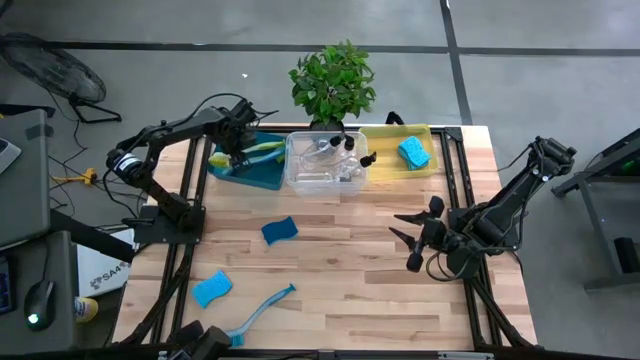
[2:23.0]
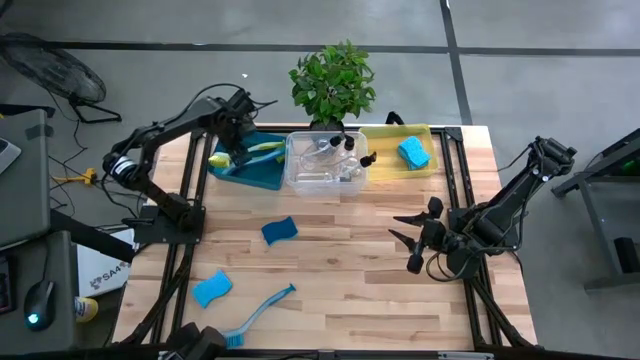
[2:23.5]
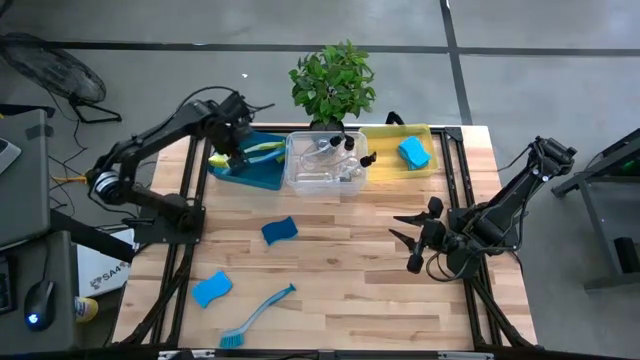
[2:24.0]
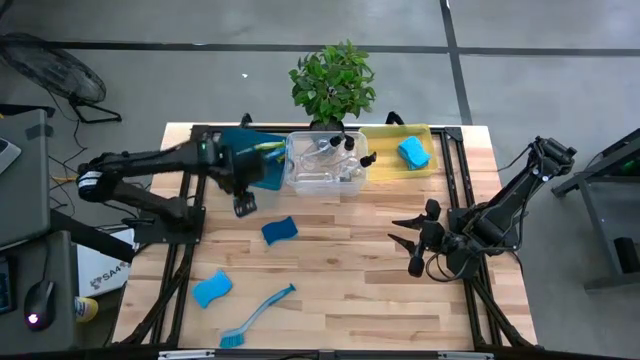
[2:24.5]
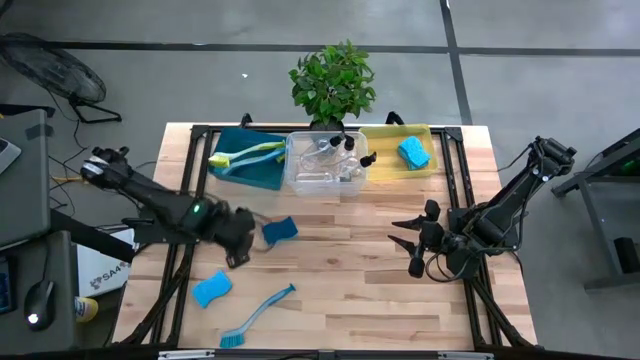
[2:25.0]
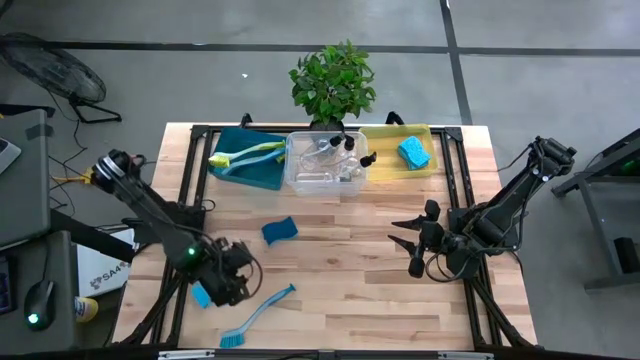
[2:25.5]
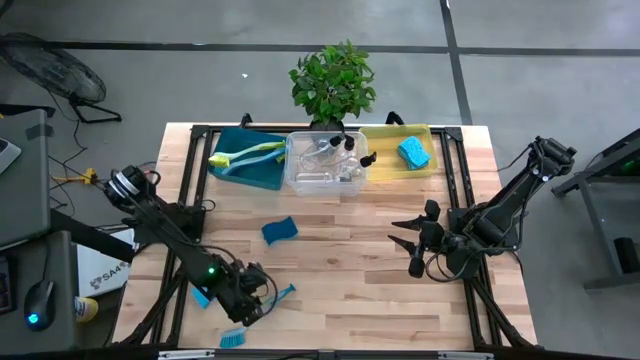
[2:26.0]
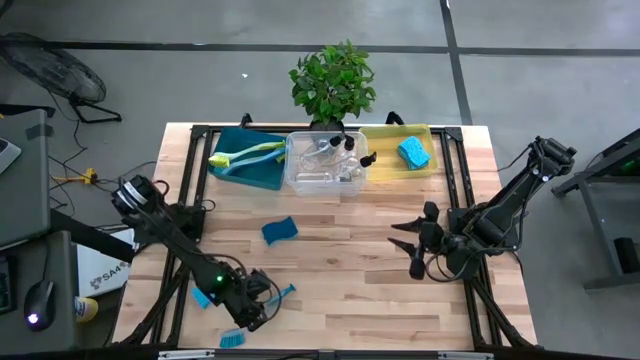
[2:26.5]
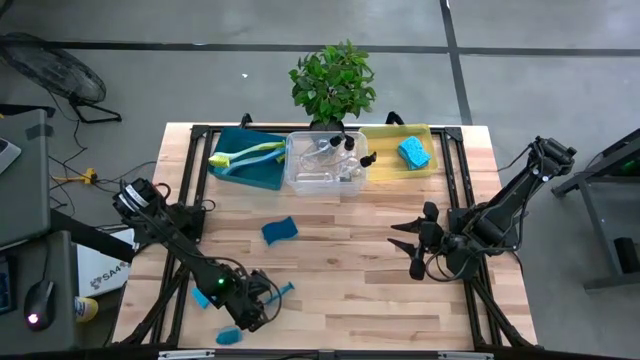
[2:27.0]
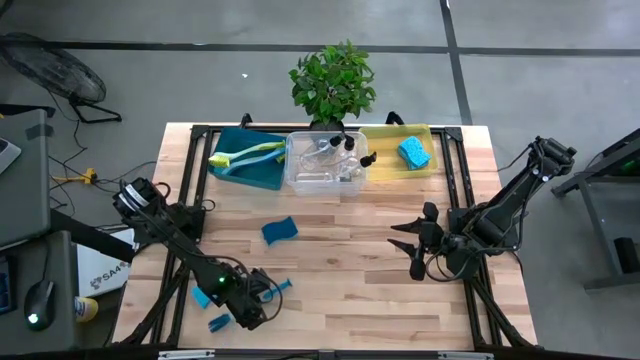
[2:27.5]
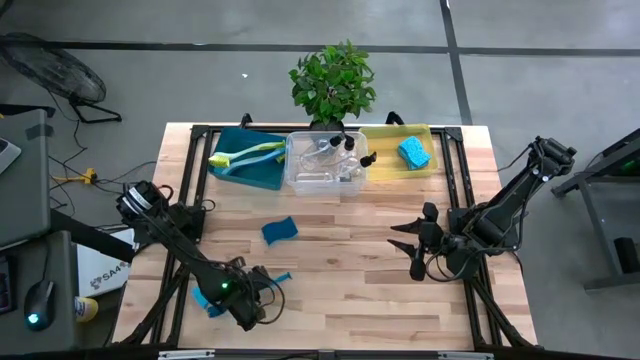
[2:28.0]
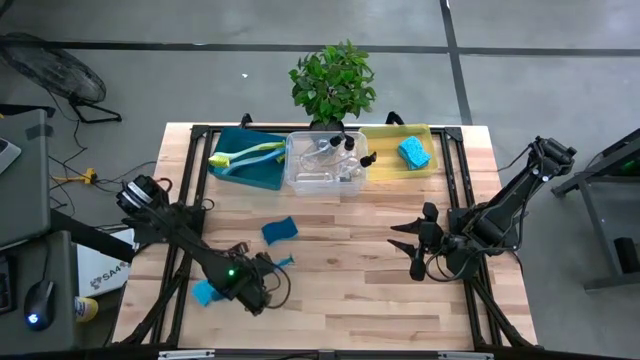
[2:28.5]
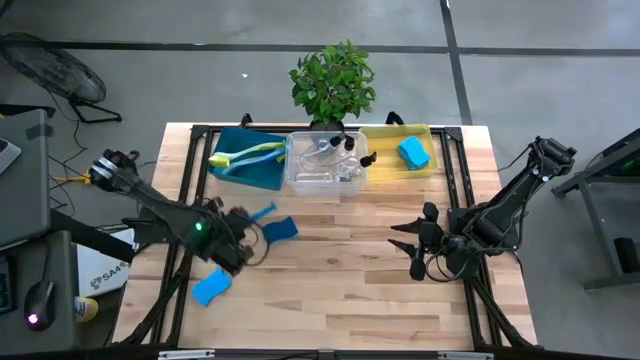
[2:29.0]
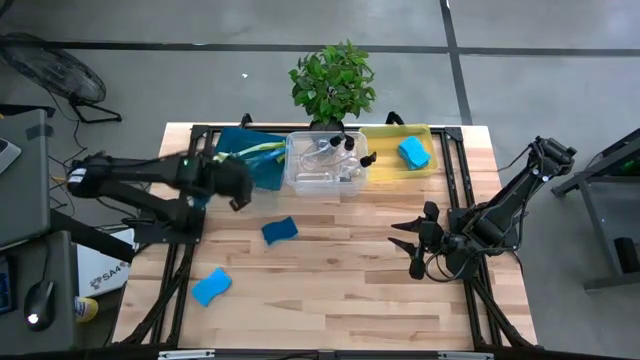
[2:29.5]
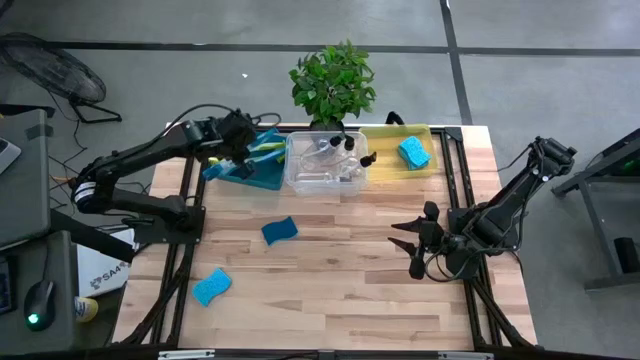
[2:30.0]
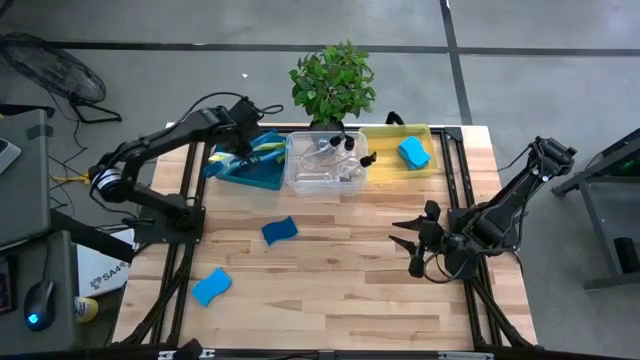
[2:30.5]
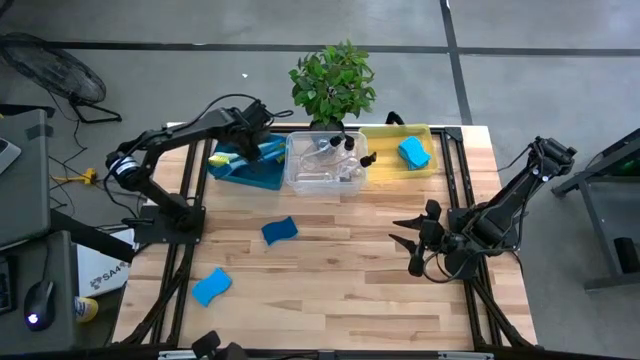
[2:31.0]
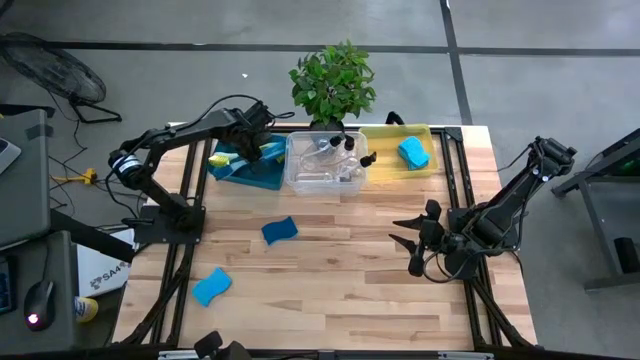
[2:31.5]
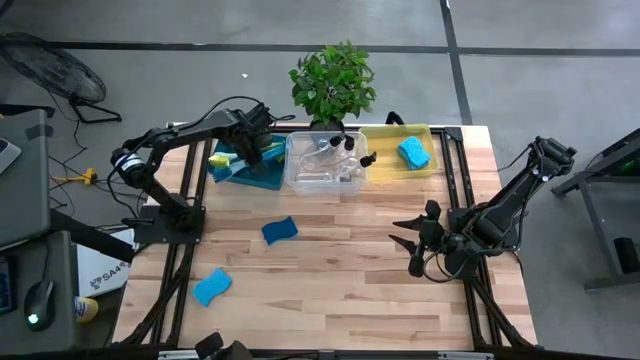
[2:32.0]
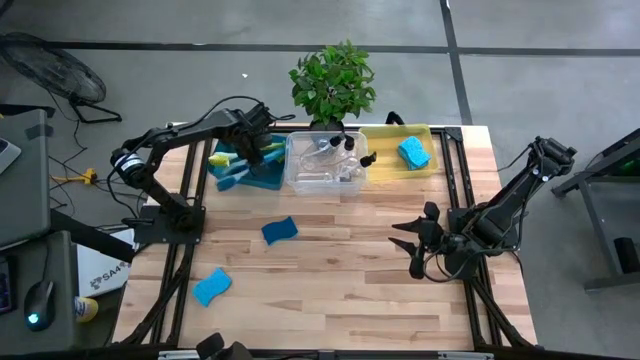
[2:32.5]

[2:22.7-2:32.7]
Task: Pick & Place Kitchen Sink Supplies
Put the blue dish brush into the blue bin

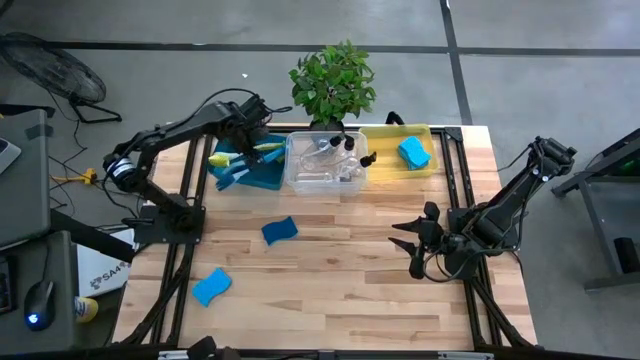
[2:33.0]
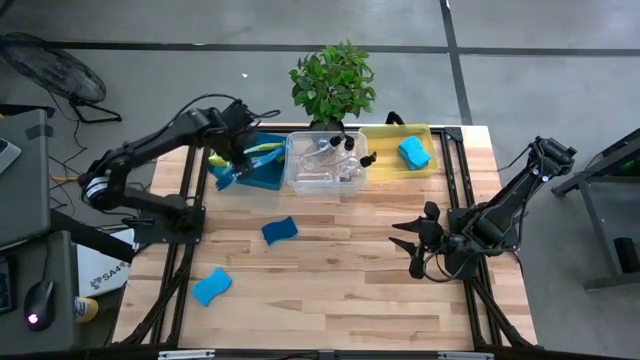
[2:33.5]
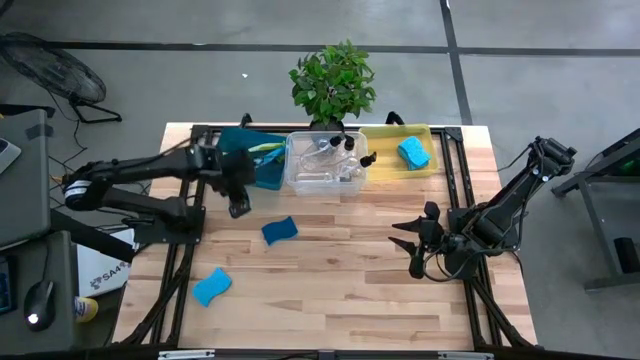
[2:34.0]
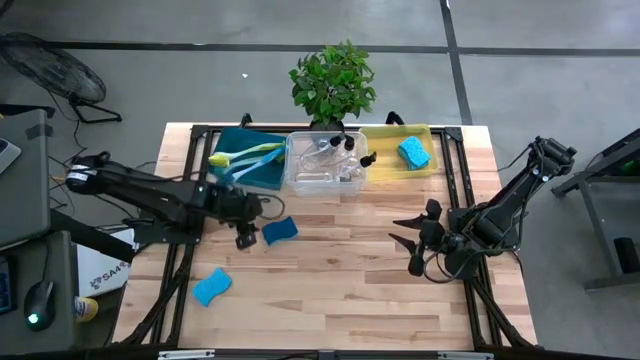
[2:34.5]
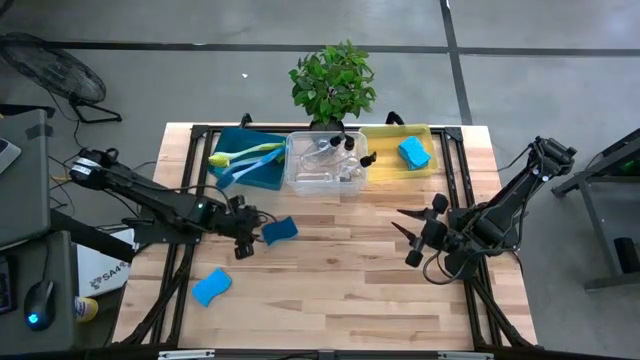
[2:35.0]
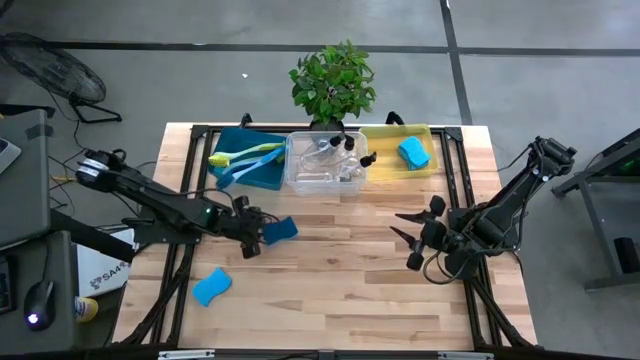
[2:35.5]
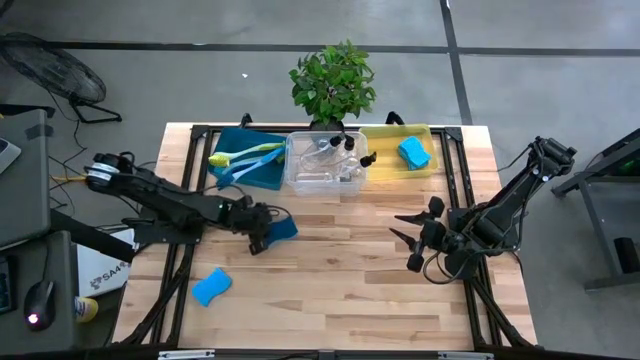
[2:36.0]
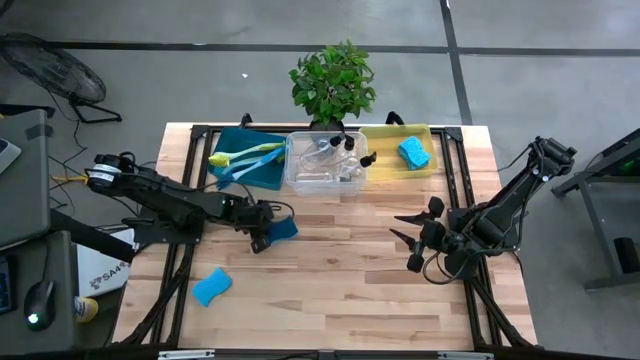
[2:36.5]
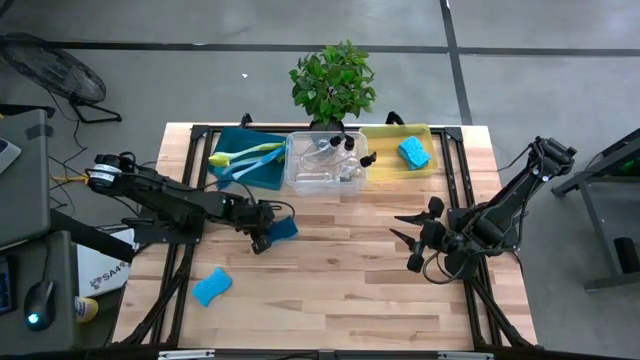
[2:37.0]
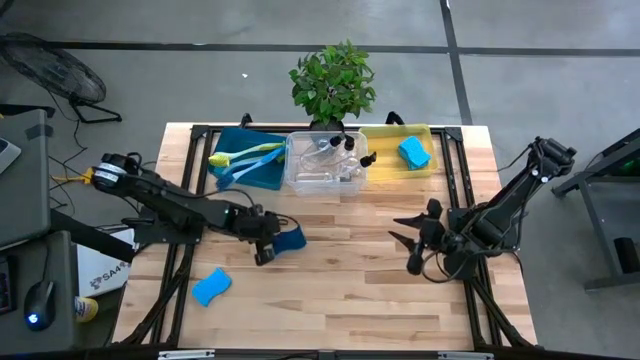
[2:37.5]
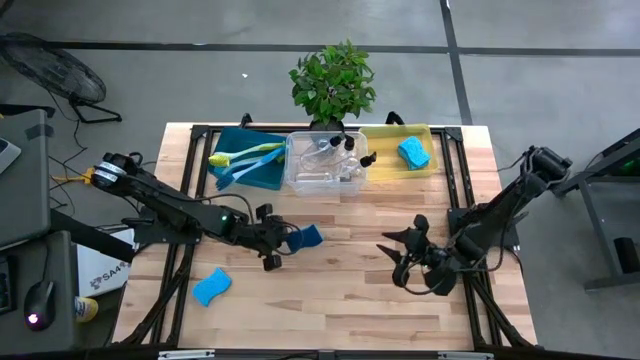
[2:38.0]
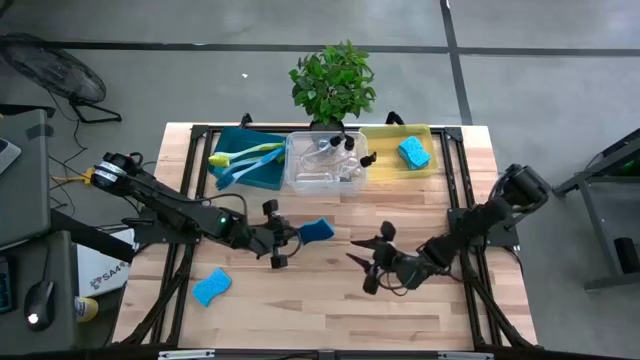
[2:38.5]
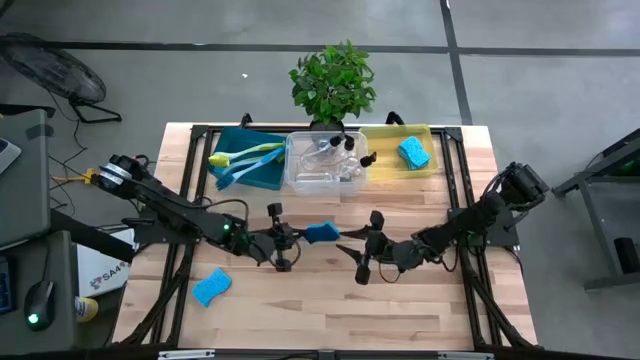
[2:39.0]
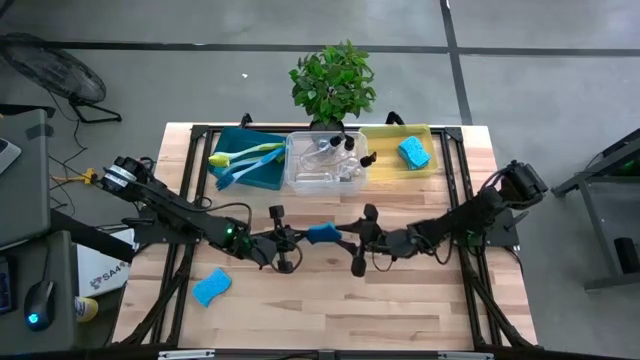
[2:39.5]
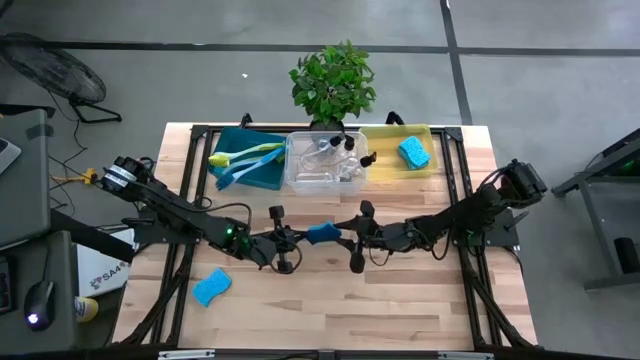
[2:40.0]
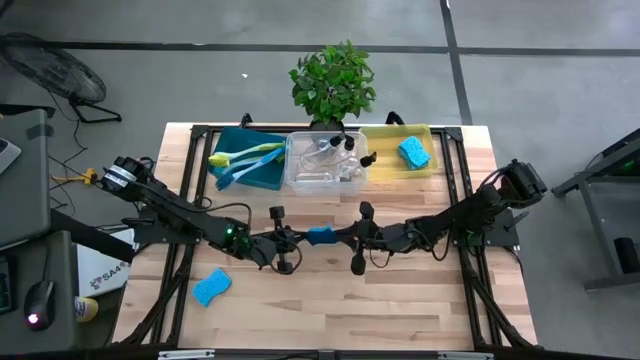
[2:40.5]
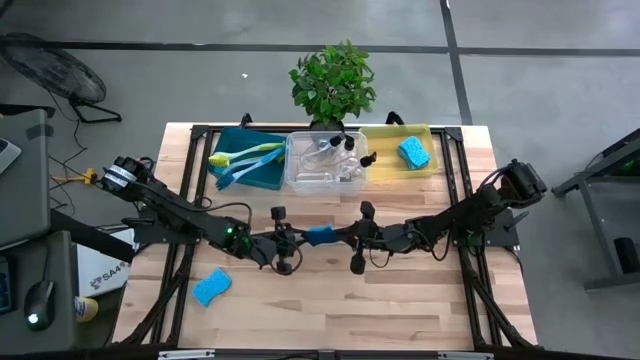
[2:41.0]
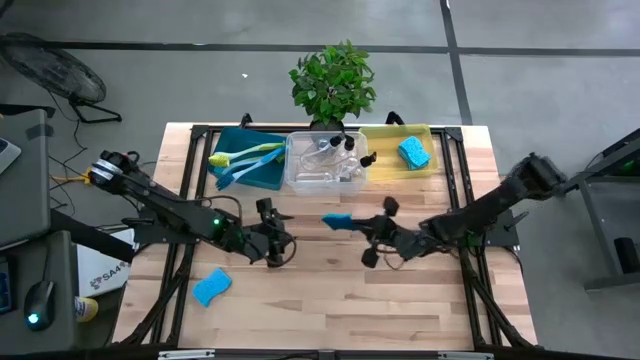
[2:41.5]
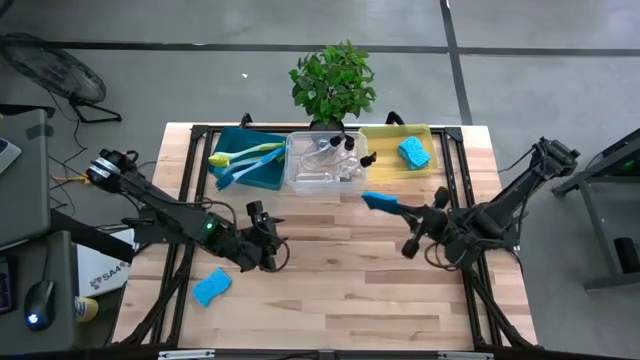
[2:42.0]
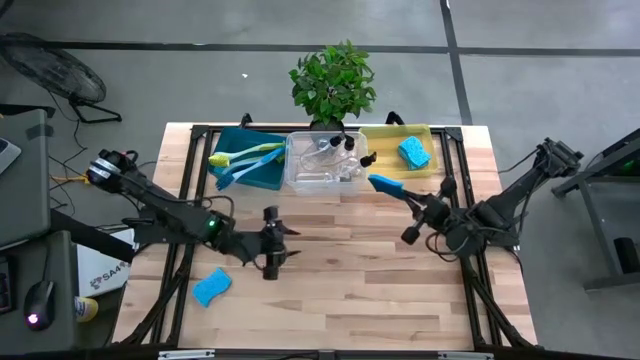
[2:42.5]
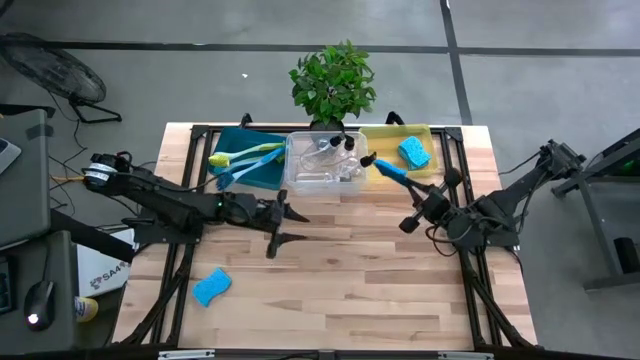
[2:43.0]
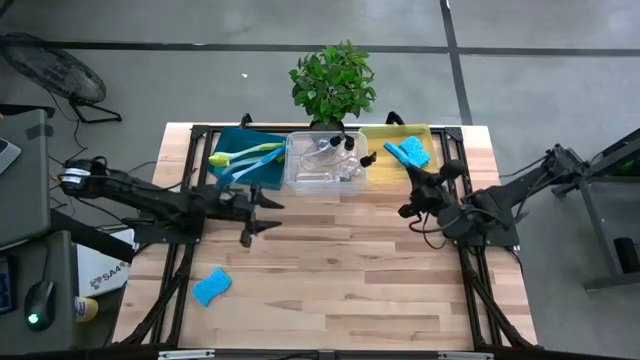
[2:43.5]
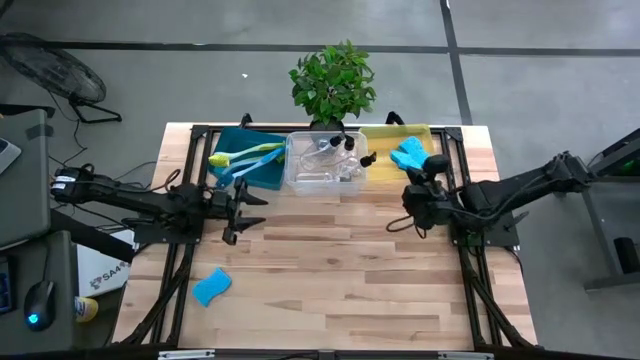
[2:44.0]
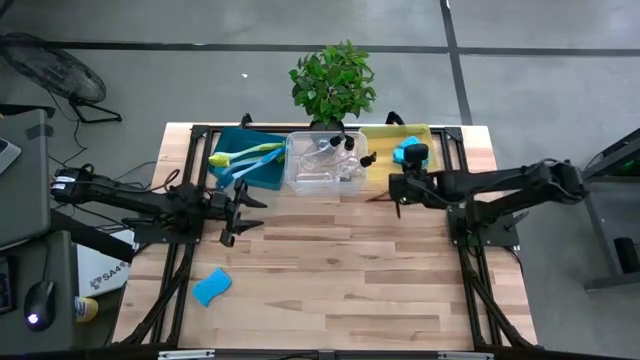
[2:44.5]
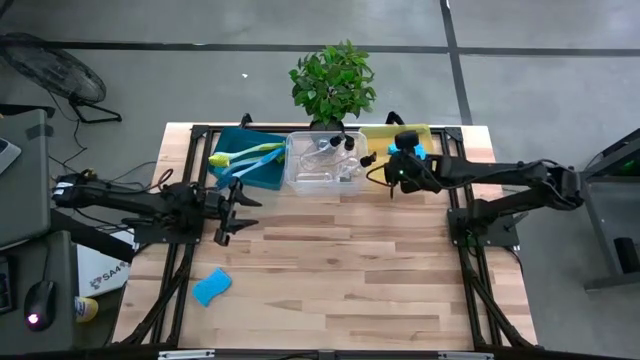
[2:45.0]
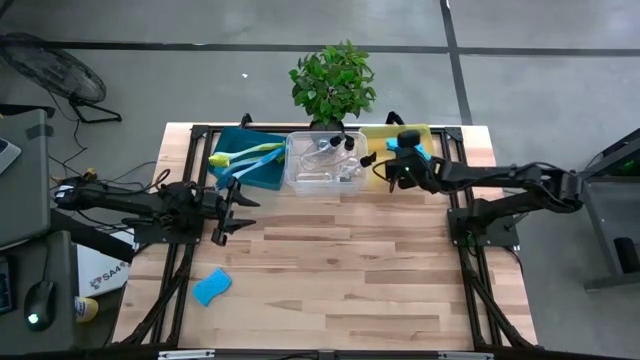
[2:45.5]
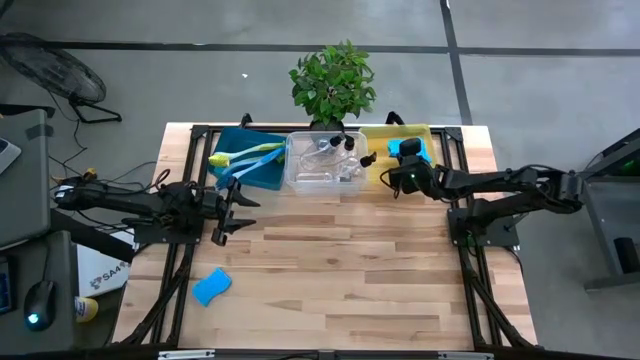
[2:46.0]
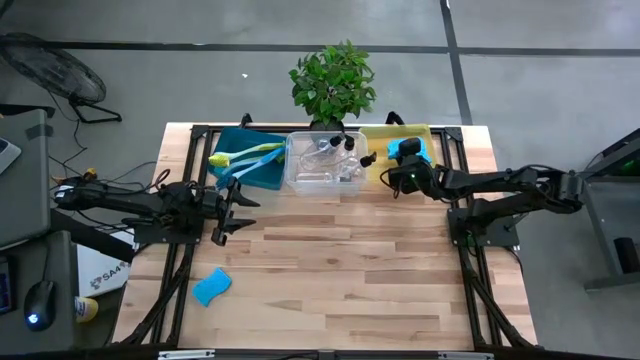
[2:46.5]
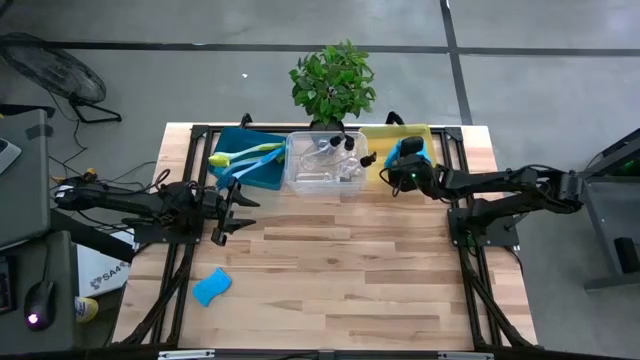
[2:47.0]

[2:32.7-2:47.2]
Put the blue sponge into the yellow bin
